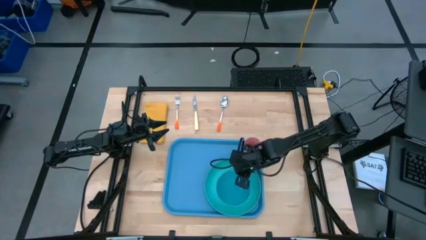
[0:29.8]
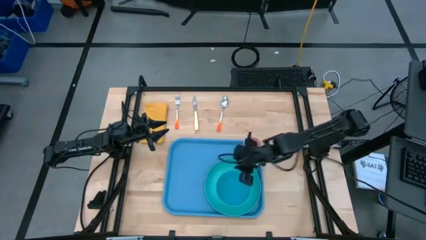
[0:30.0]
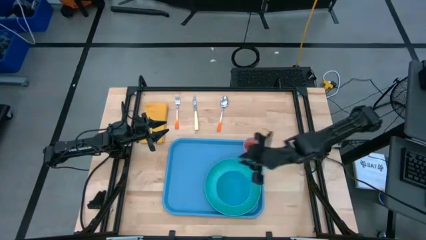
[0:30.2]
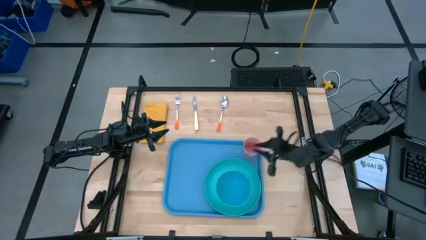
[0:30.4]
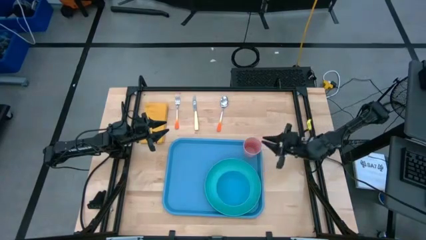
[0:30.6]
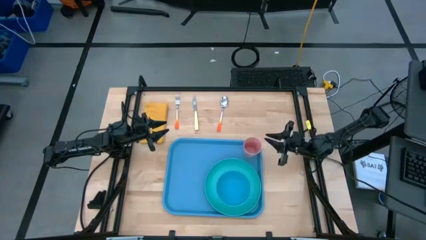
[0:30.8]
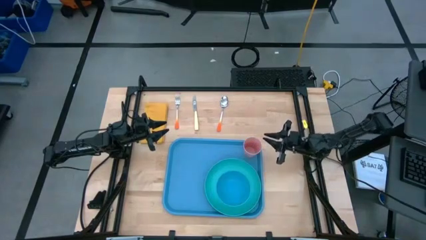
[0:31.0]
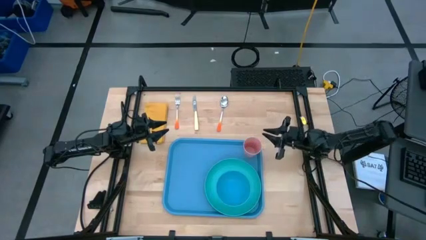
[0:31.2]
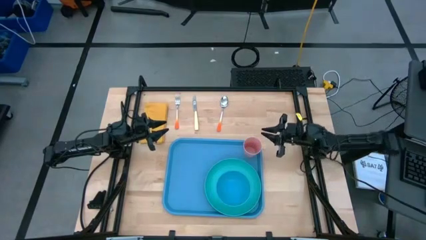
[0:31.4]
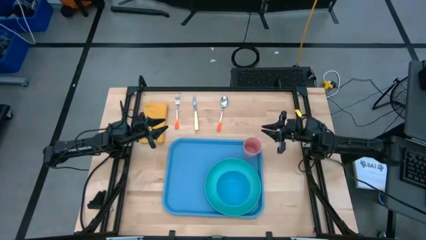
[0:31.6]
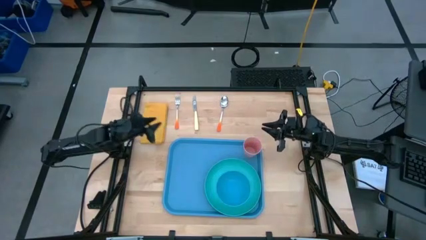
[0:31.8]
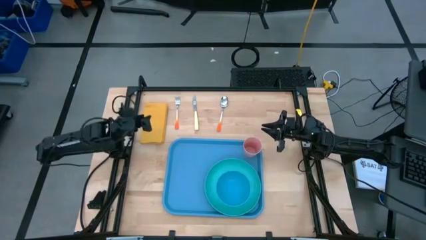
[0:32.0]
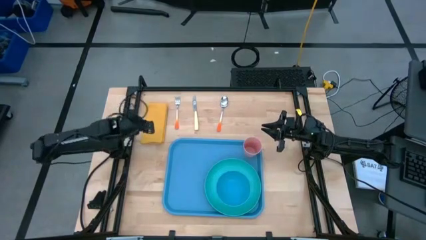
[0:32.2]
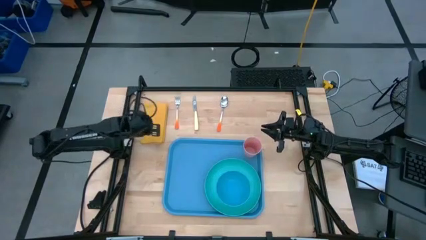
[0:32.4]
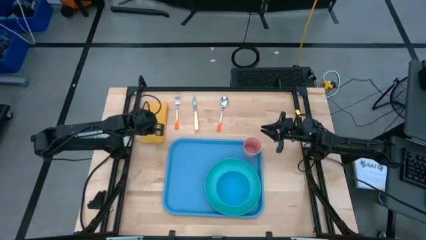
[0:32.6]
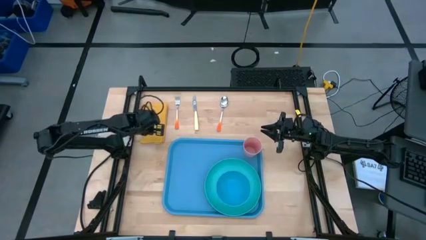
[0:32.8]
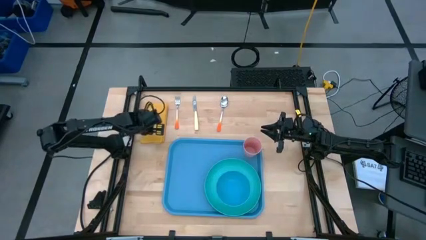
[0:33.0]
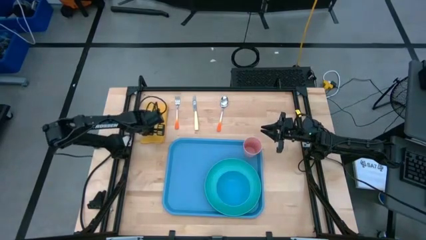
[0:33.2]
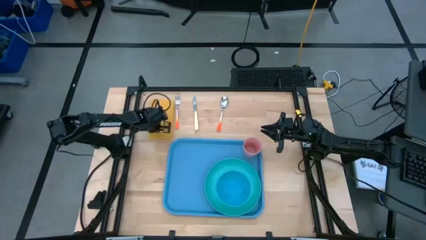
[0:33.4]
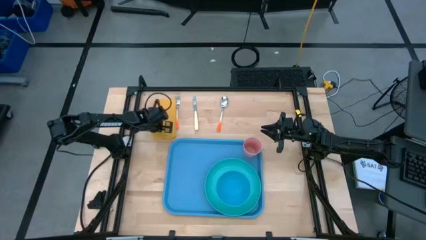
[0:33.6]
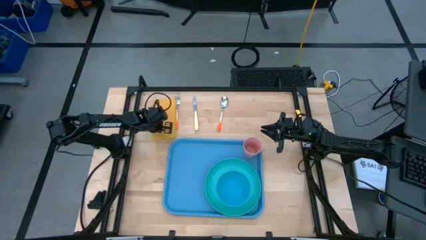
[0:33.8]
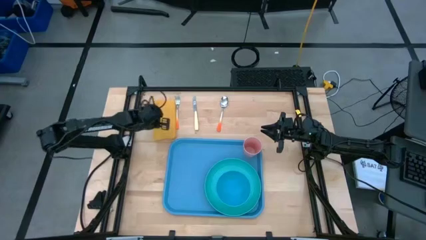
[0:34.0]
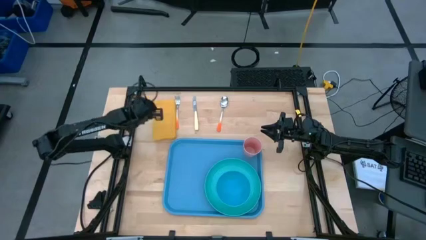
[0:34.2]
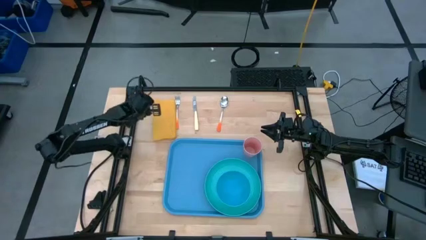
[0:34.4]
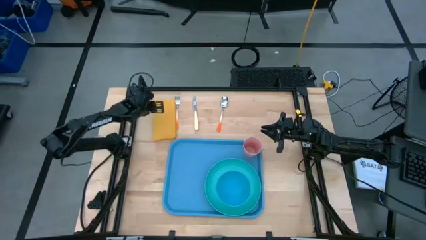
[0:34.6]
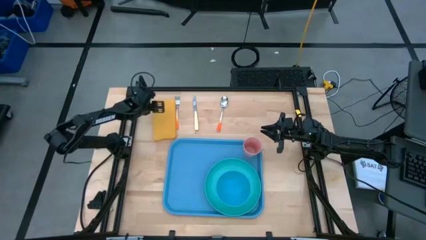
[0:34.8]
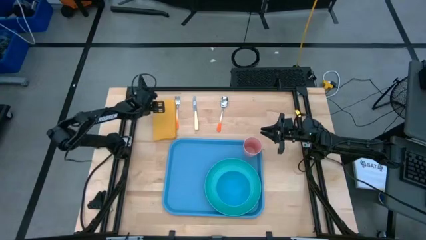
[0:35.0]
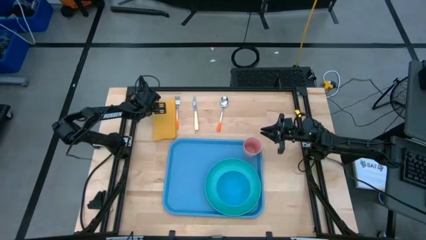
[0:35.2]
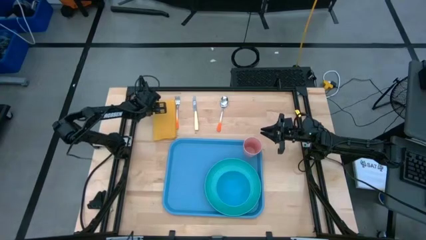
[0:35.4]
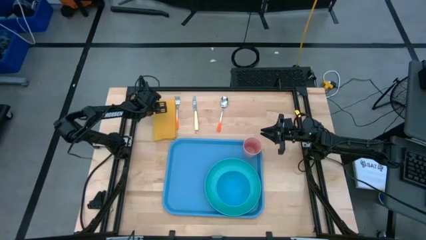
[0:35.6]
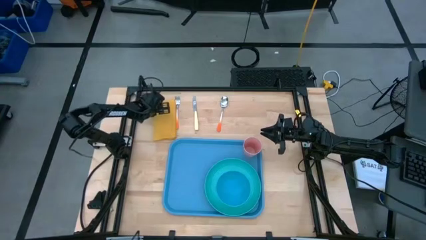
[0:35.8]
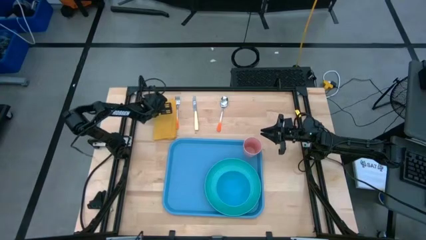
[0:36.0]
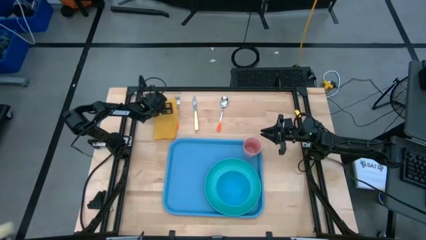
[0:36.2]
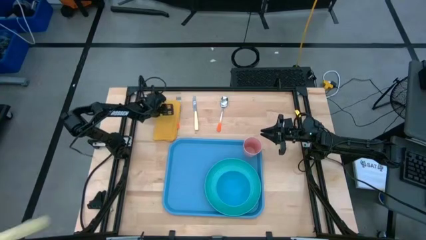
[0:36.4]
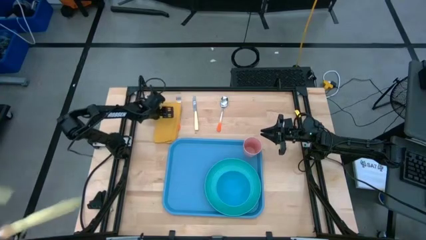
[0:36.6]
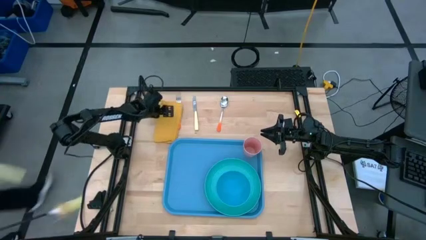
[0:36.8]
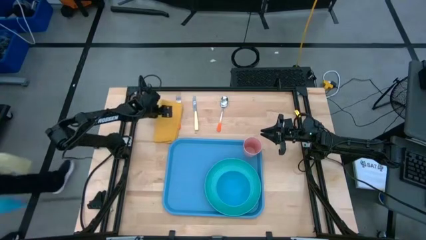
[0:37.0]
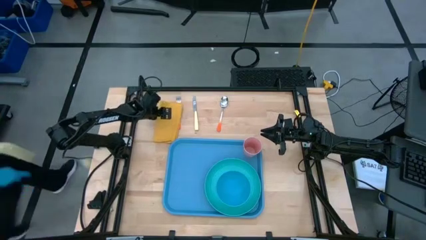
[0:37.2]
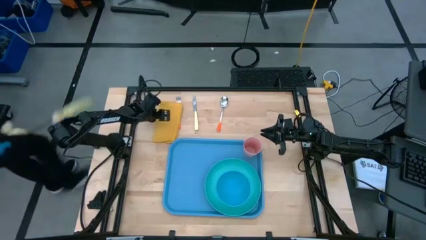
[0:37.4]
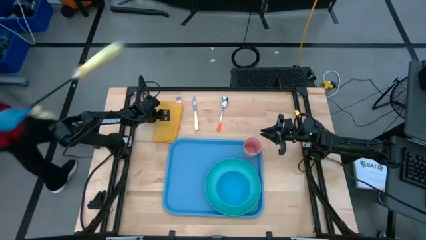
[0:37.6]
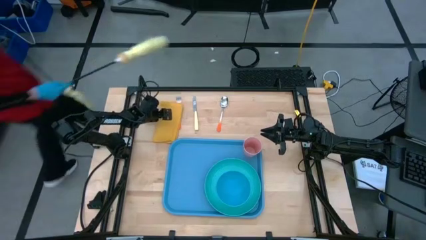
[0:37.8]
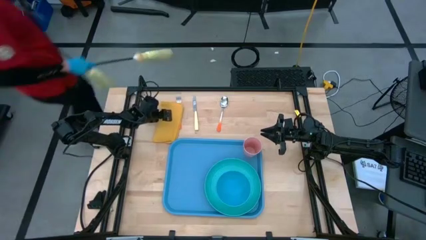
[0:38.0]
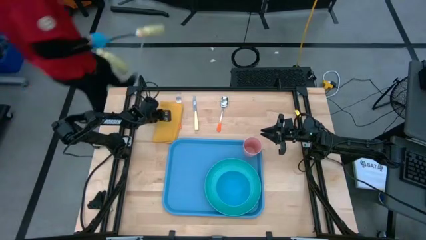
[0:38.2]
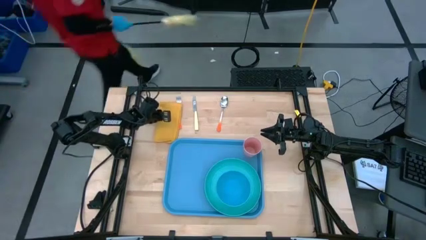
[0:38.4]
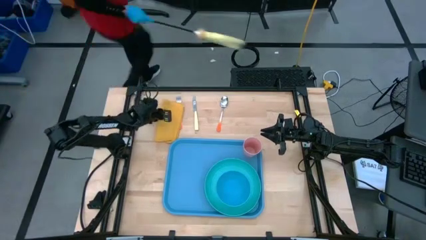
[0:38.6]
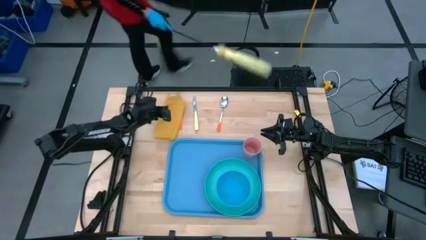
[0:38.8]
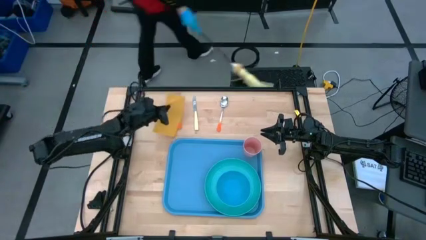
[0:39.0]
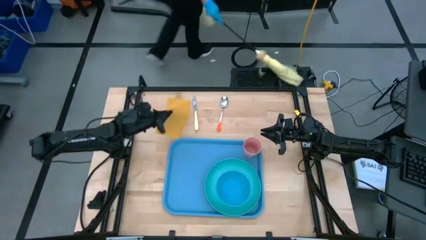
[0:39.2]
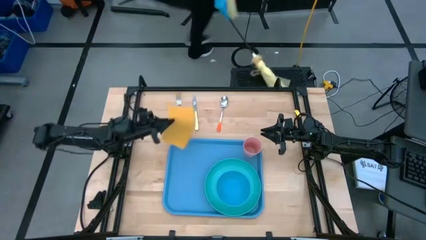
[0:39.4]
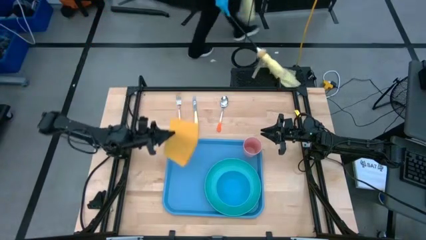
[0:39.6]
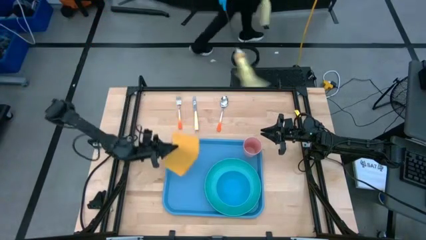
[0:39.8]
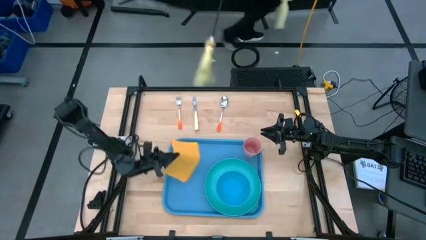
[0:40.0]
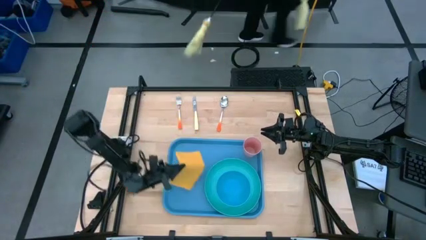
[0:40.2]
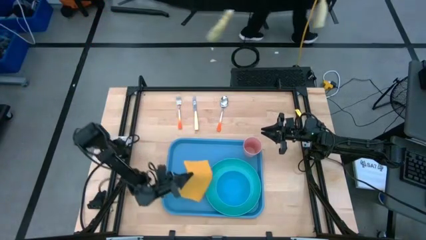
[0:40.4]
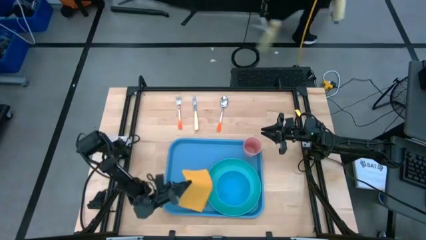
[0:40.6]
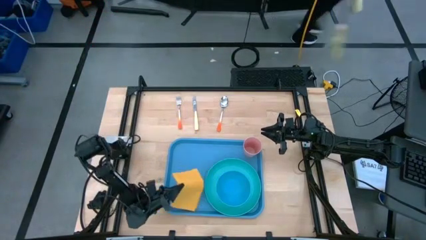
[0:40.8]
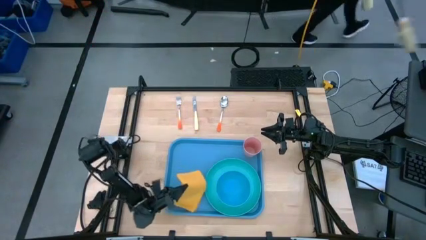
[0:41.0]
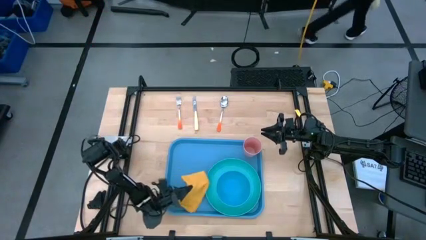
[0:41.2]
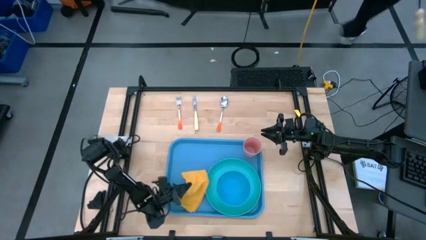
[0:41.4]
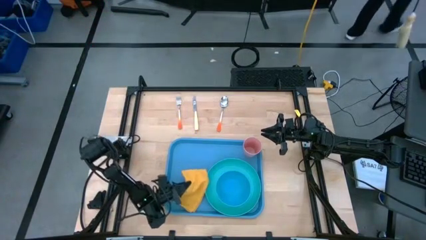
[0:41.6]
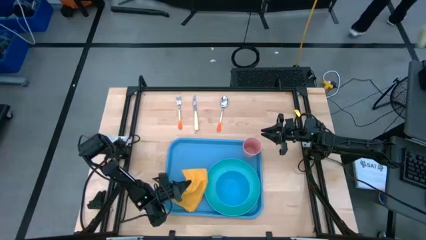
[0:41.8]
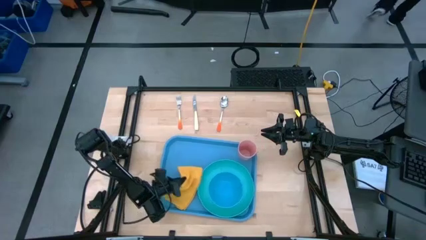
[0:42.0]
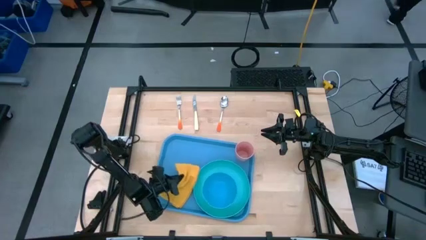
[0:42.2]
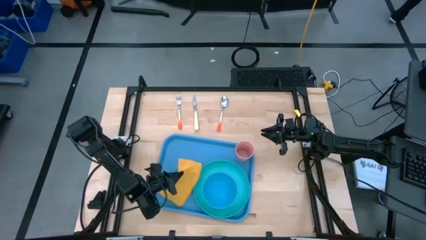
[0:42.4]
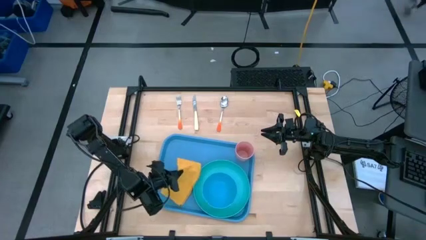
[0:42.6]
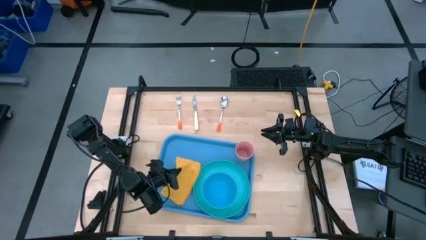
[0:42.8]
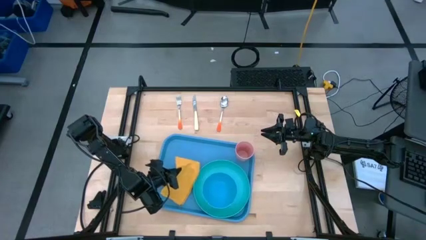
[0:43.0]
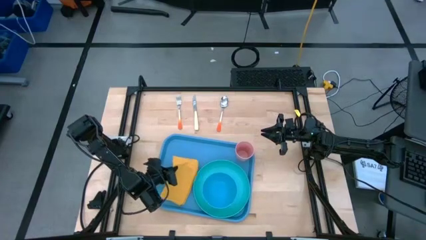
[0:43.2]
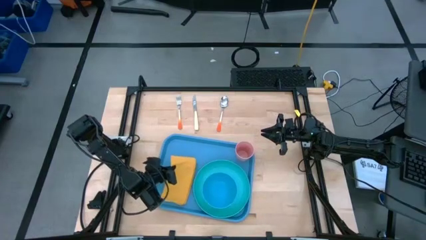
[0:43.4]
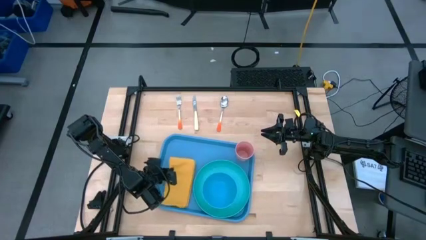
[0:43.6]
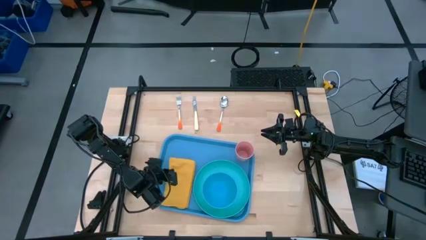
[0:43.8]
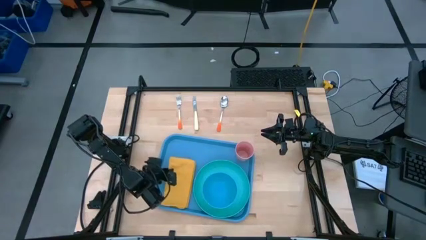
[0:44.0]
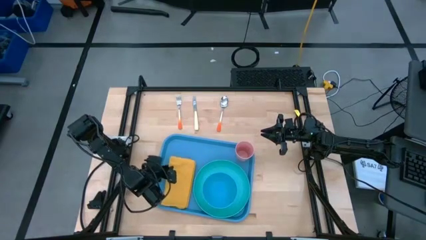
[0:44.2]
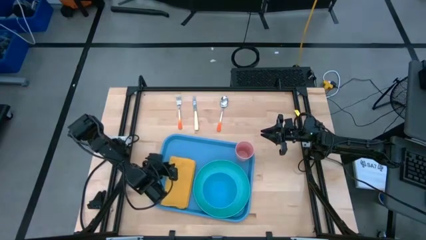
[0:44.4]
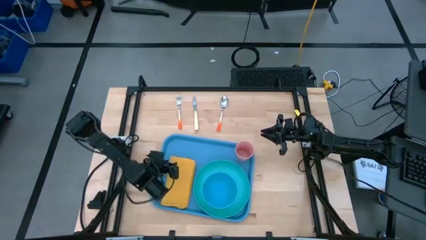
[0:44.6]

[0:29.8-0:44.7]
Task: Set up tray
Put the yellow napkin on the blue serving tray to the left of the blue plate

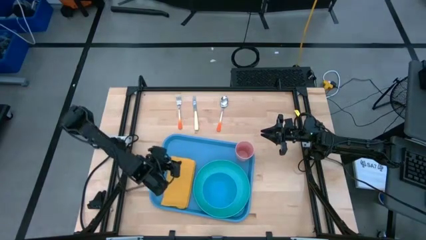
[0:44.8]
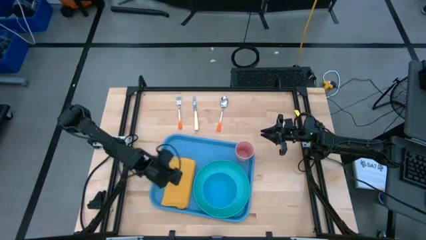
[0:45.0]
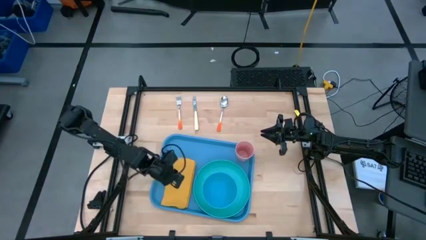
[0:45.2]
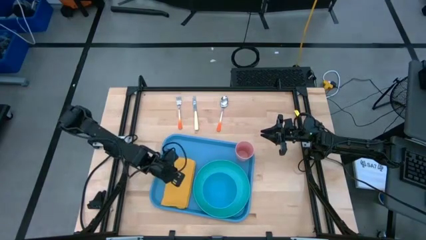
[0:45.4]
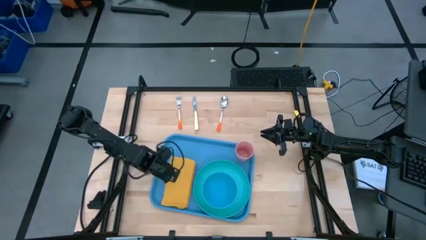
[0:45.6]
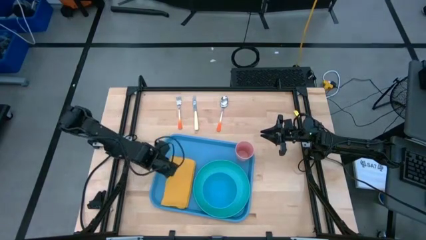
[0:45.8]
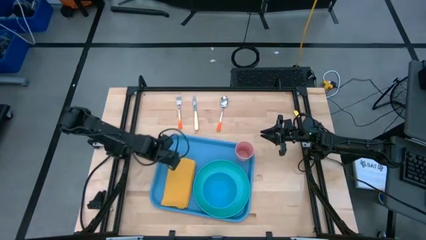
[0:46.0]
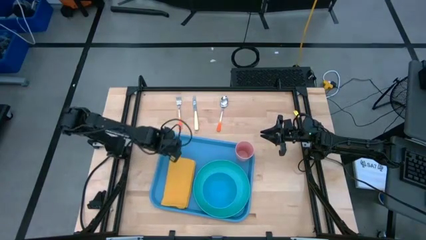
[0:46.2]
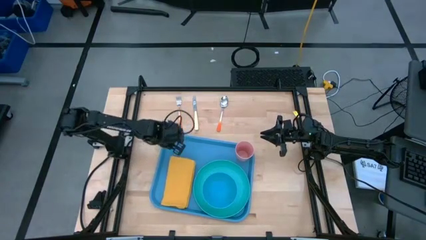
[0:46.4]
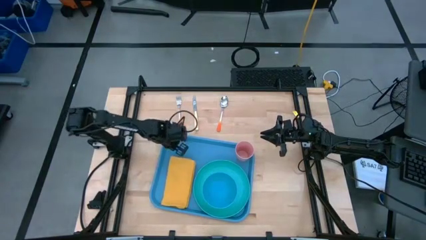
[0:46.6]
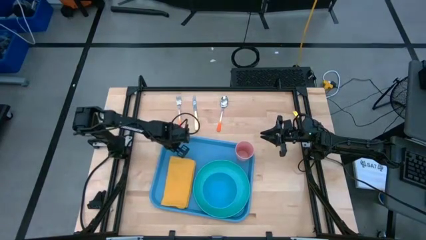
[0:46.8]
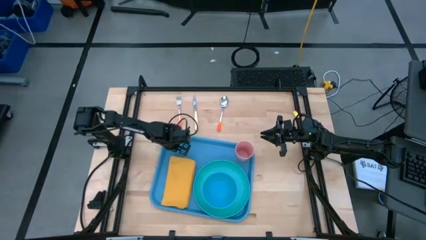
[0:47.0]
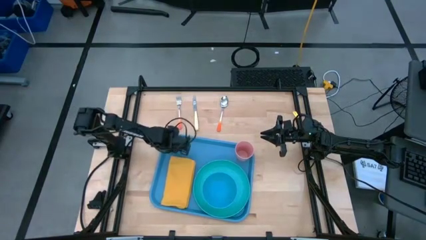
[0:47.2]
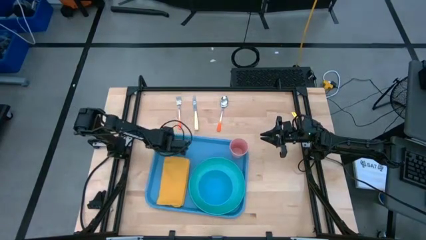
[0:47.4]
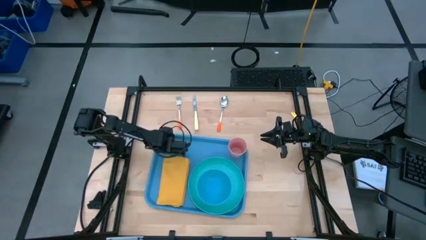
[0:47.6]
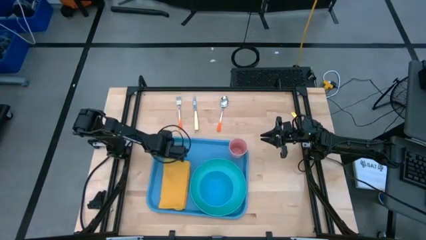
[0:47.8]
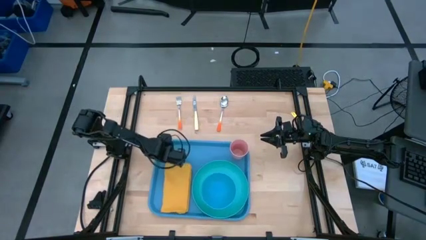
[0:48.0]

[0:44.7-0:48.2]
Adjust the blue serving tray
